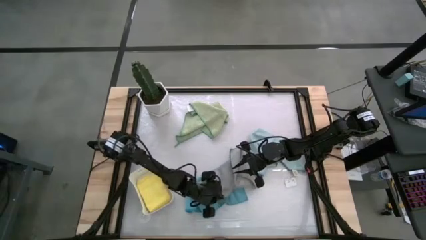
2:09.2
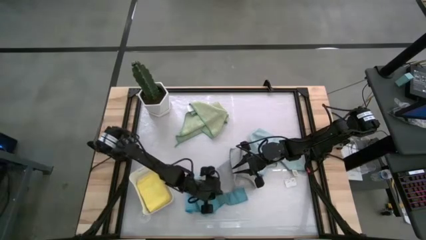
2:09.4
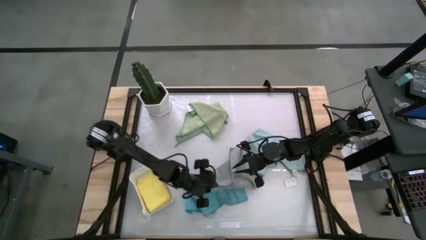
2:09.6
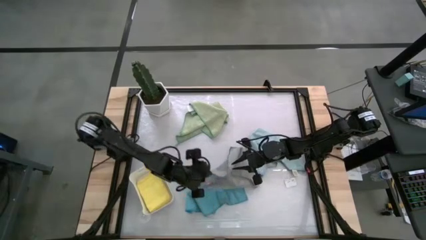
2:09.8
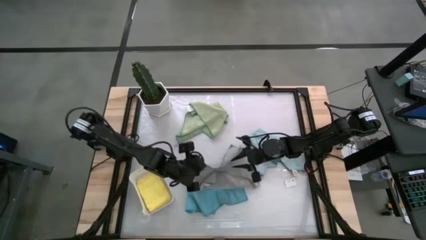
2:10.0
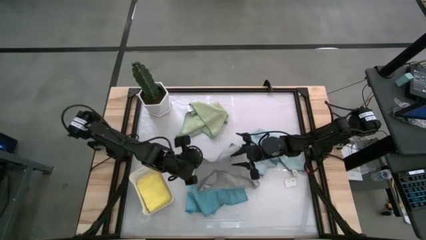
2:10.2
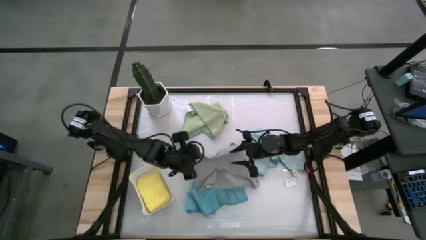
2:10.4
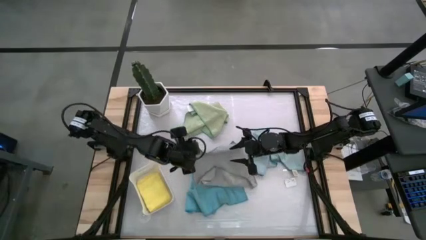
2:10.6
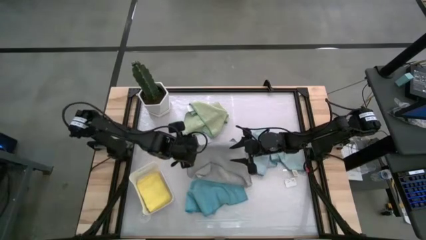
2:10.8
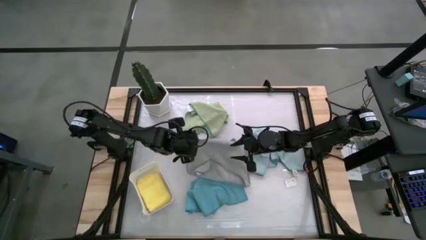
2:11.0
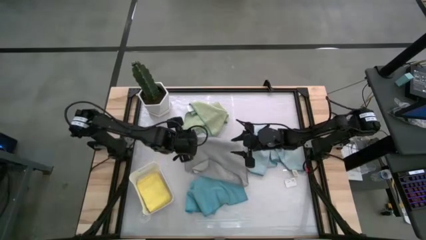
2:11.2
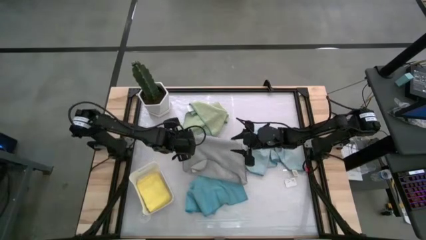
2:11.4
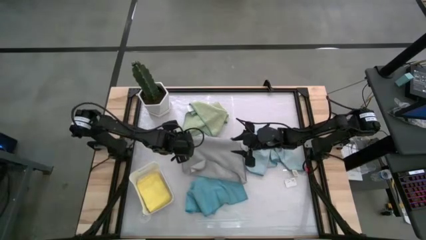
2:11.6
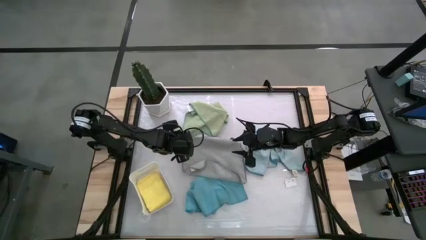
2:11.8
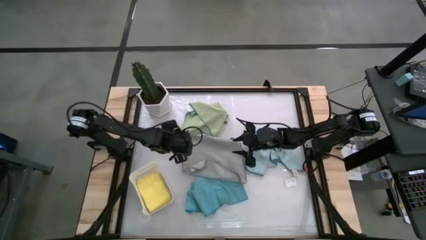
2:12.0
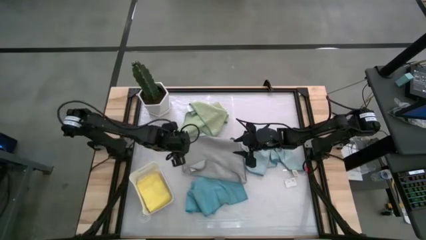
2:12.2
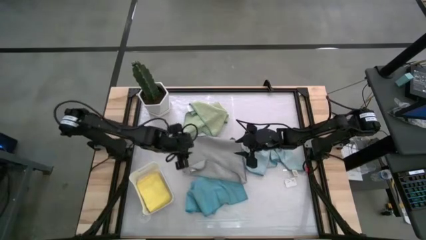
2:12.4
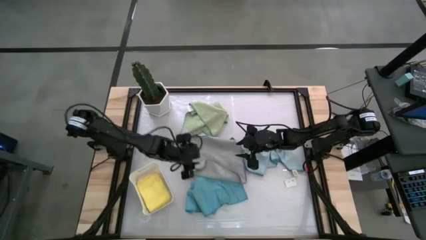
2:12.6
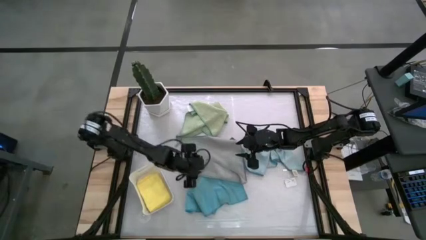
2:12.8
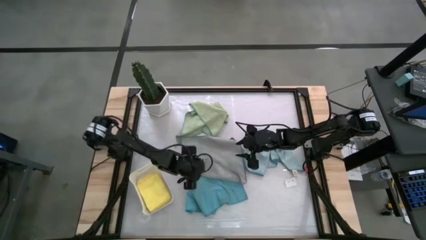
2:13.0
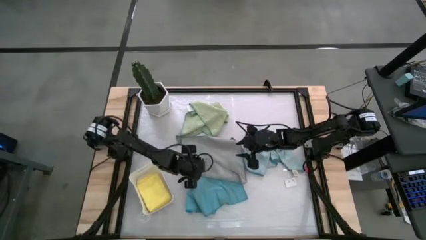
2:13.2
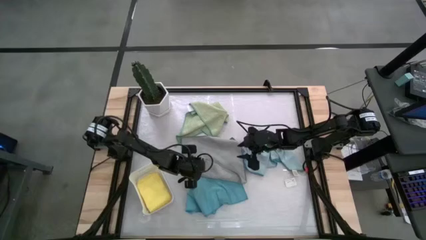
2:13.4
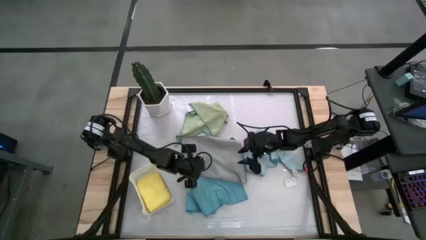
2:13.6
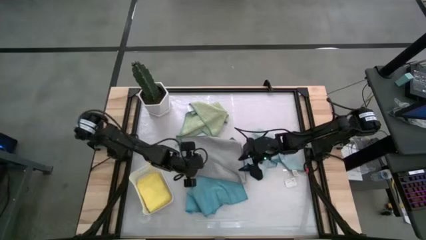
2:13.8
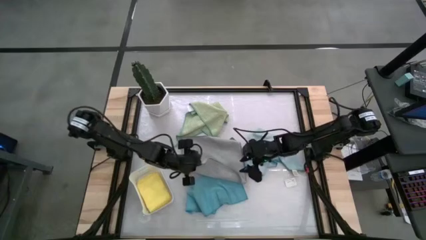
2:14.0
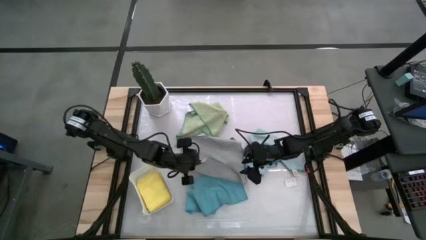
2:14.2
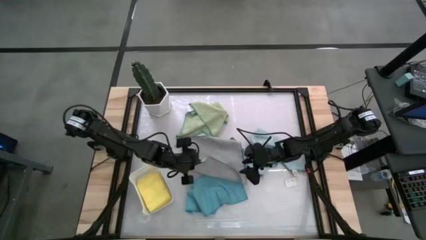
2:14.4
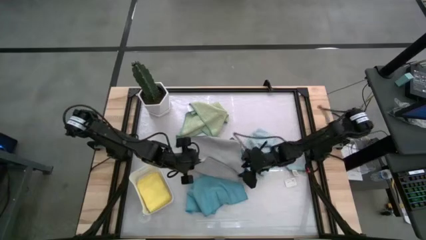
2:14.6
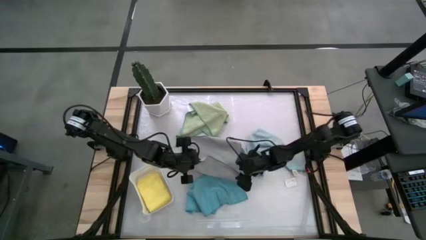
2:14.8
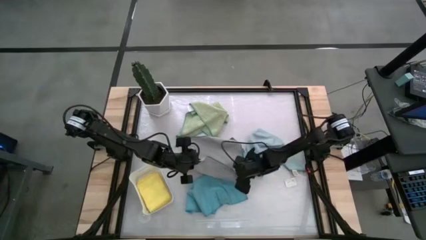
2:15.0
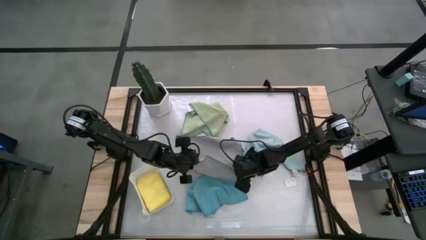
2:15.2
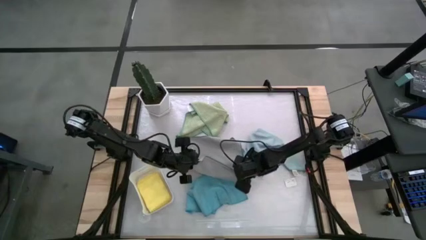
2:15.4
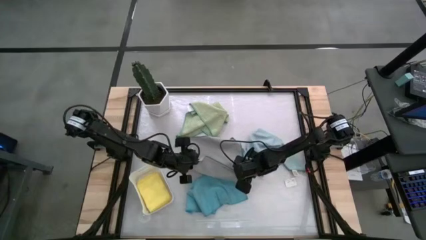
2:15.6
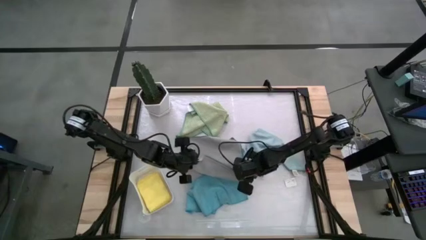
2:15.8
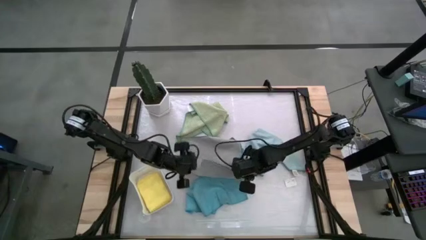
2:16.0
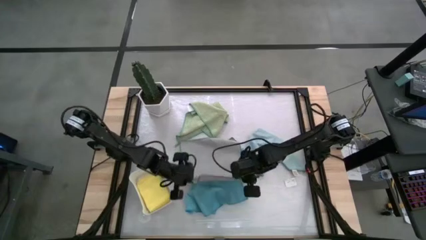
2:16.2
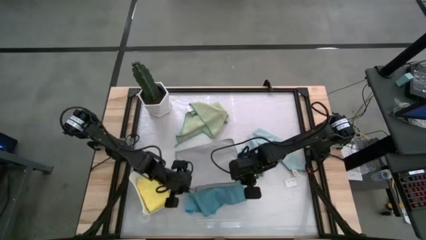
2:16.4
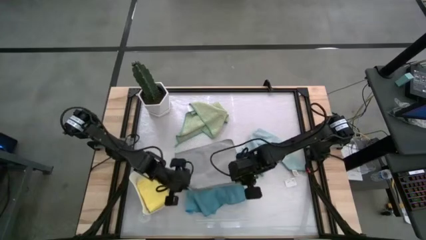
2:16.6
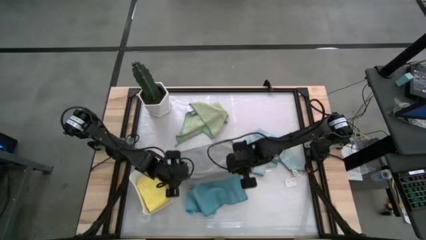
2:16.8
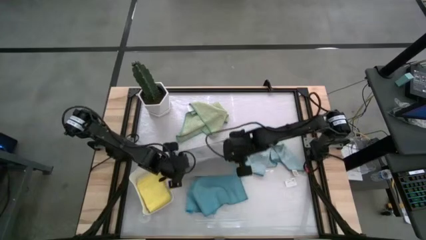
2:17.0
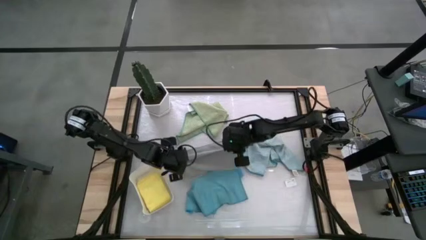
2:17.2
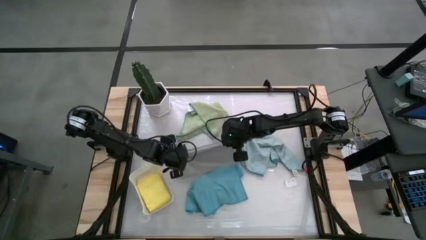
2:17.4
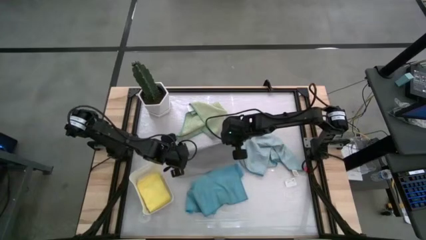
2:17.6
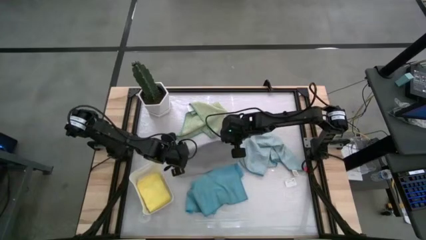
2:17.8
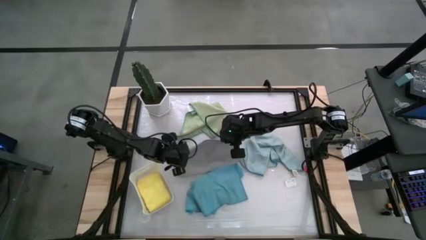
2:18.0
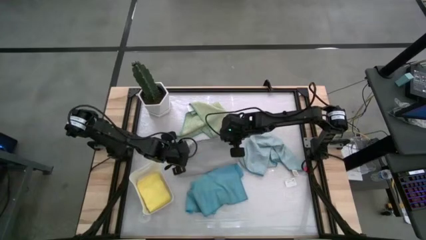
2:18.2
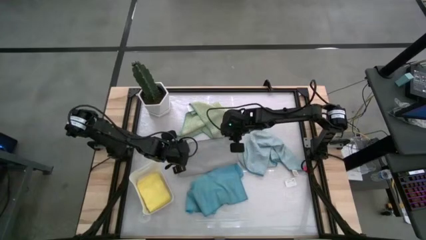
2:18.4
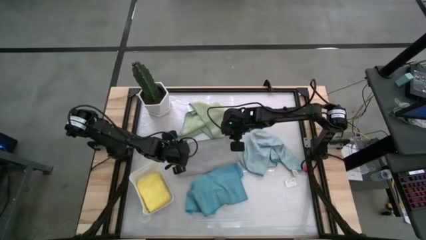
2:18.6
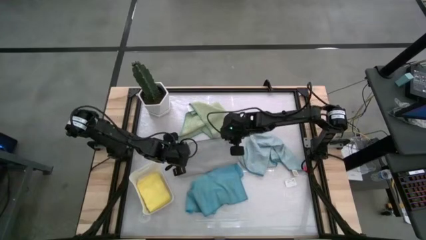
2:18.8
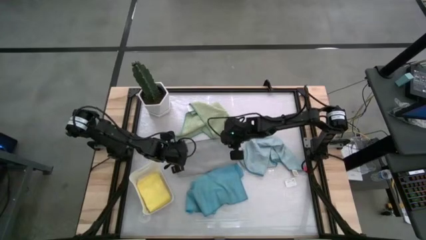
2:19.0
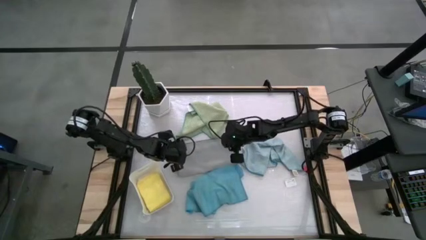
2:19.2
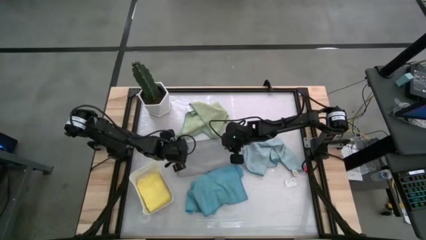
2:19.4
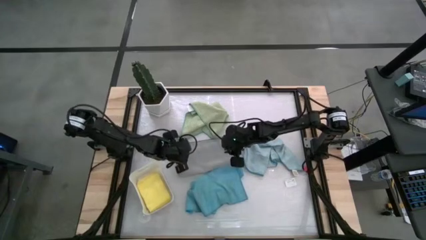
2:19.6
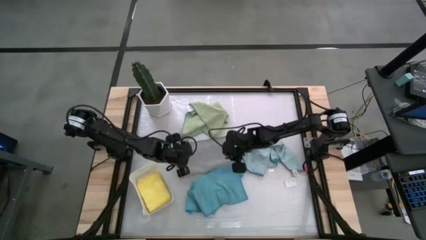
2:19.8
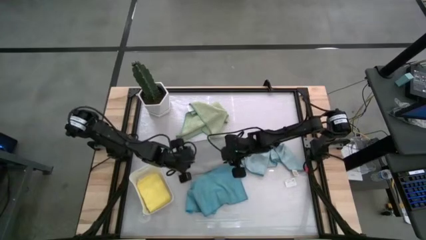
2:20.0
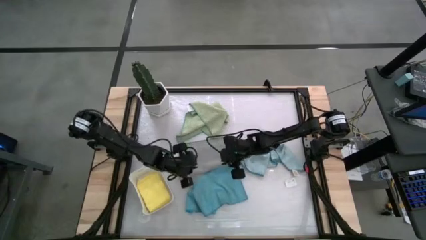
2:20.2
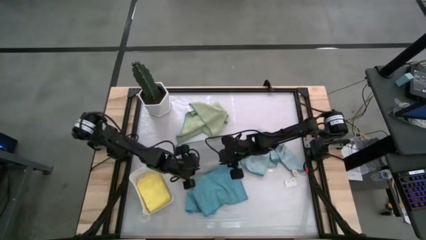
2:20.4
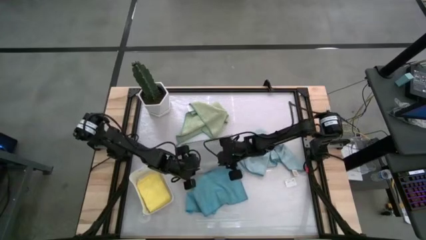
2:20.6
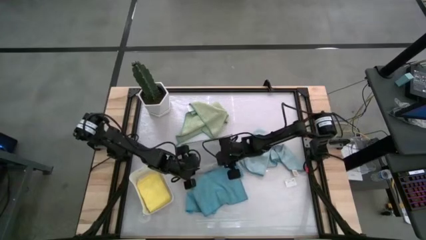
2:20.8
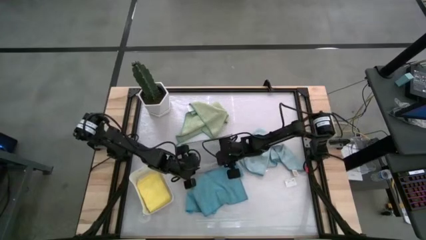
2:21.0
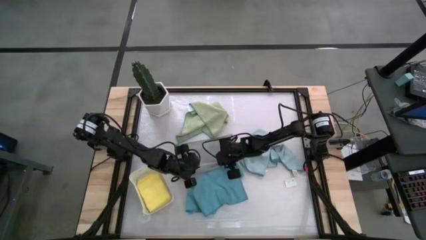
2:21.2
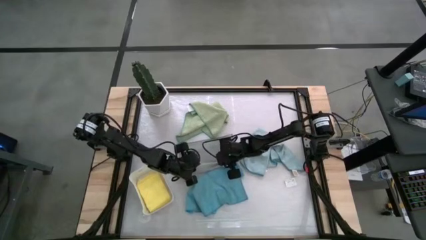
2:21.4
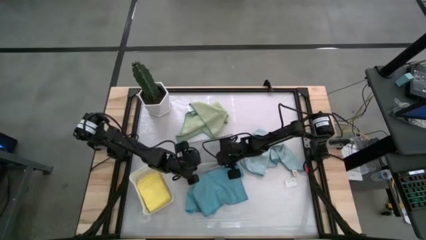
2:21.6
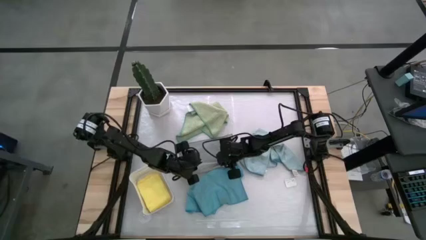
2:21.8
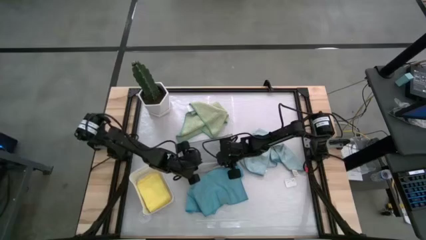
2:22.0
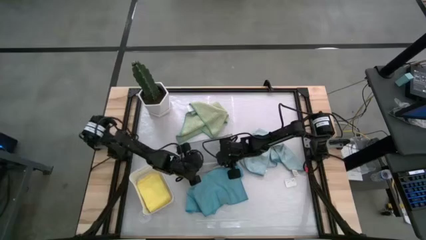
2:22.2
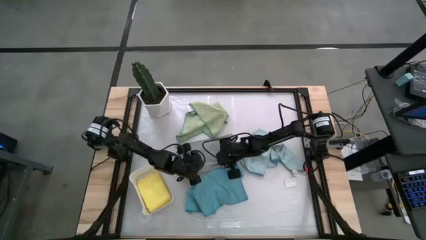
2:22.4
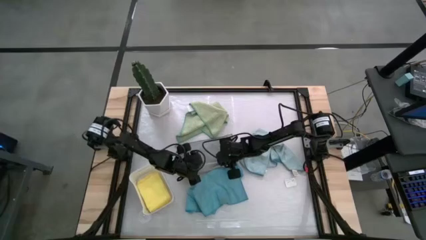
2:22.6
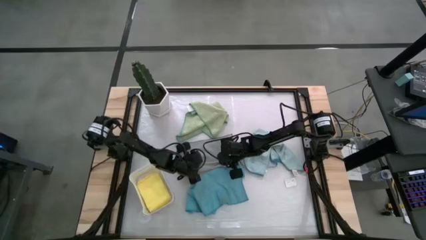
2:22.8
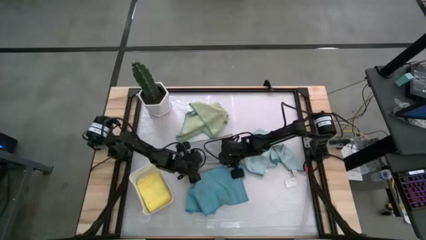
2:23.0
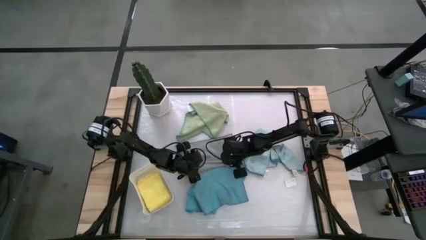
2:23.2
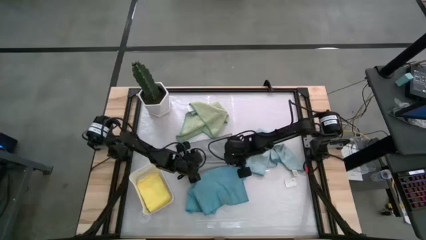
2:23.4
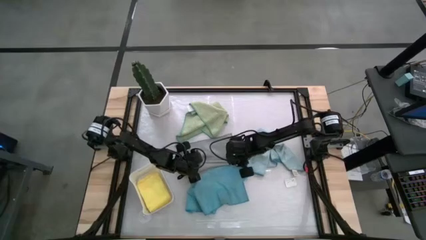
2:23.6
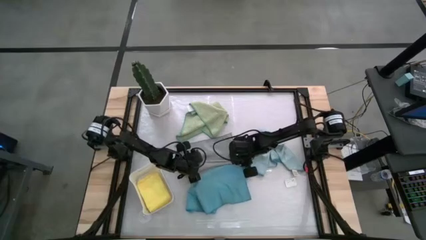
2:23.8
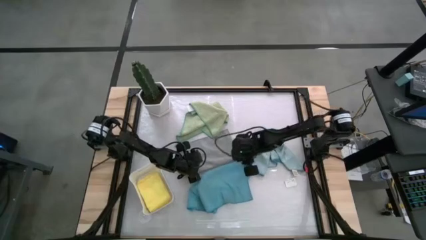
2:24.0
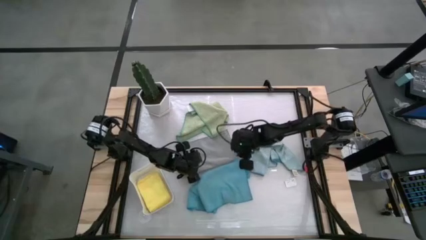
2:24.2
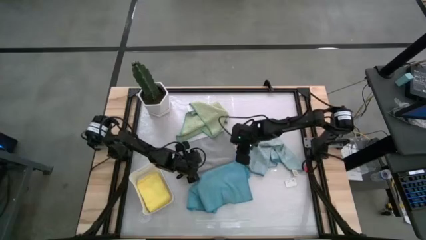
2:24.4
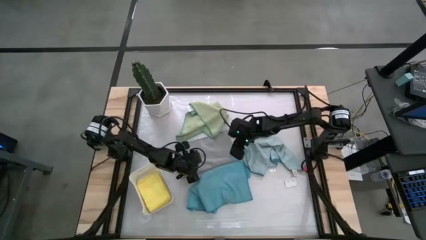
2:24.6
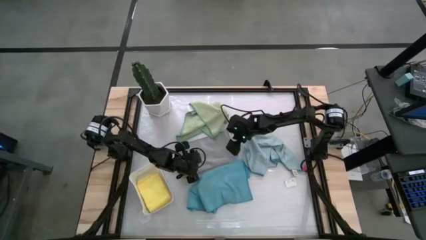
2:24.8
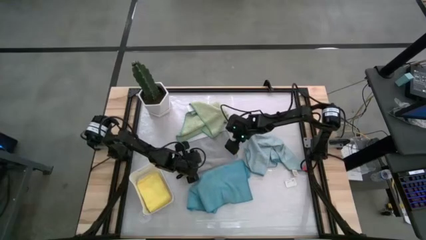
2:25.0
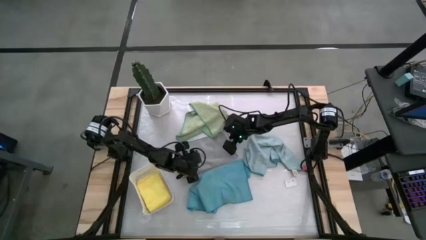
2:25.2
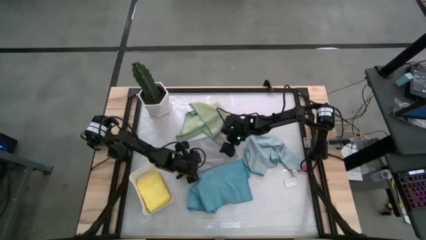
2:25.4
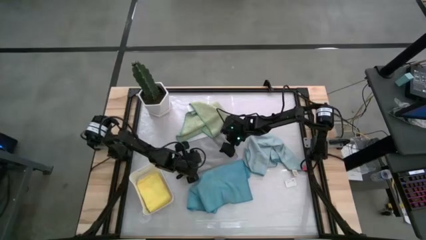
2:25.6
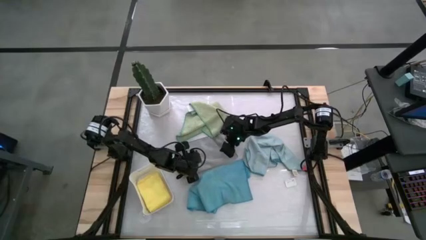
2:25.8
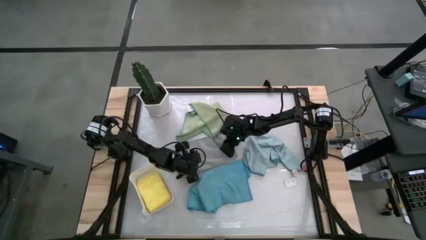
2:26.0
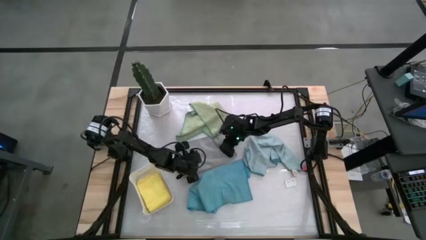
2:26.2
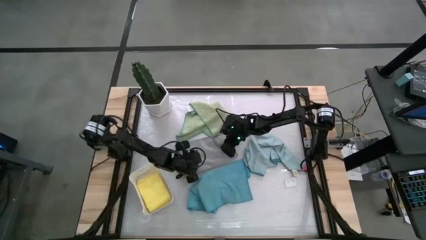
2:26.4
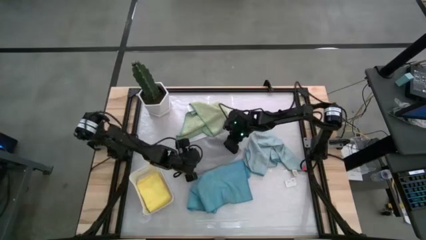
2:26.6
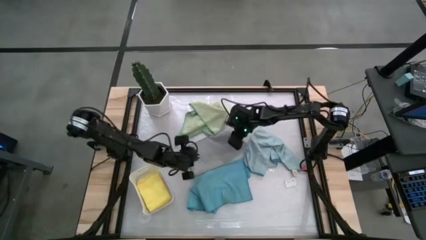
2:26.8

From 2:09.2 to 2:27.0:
Task: Fold microfiber towels
Fold the gray microfiber towel
